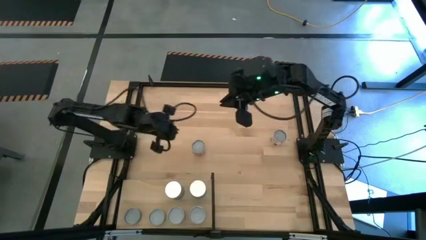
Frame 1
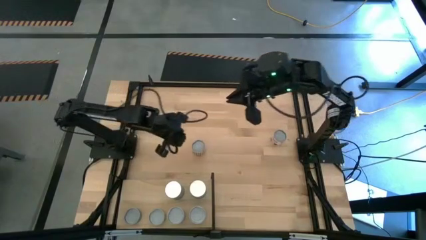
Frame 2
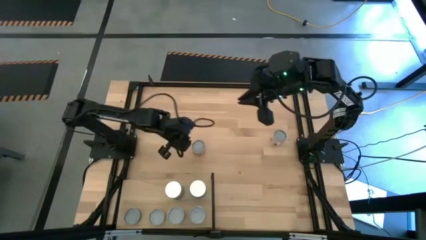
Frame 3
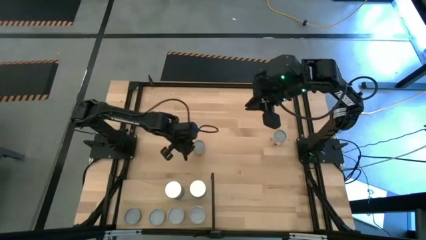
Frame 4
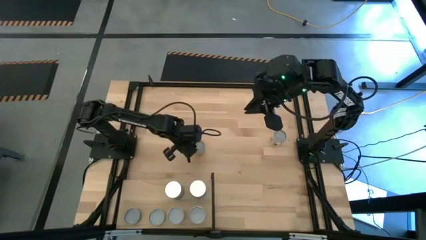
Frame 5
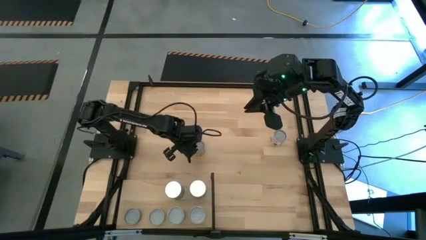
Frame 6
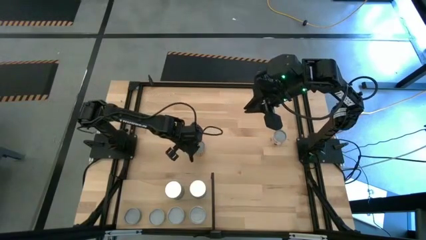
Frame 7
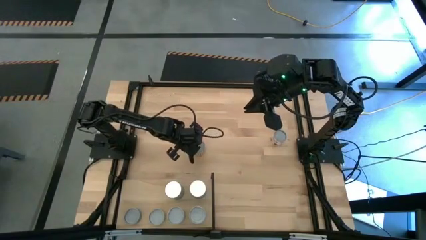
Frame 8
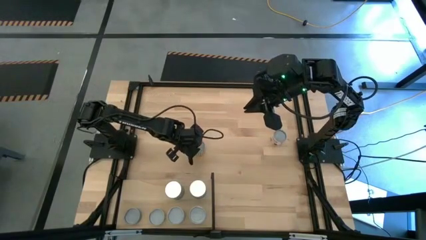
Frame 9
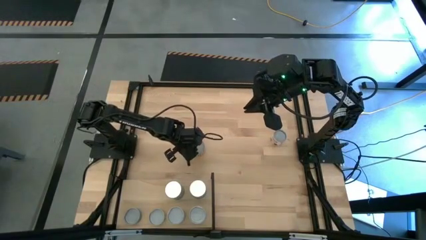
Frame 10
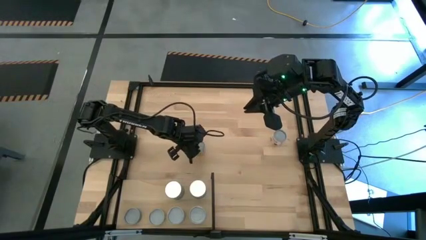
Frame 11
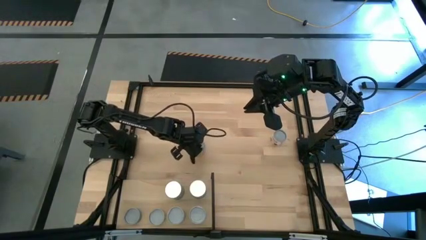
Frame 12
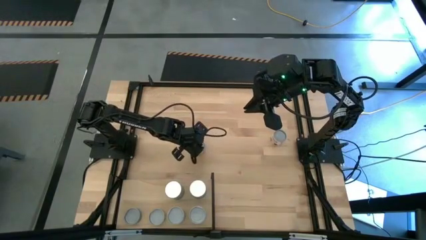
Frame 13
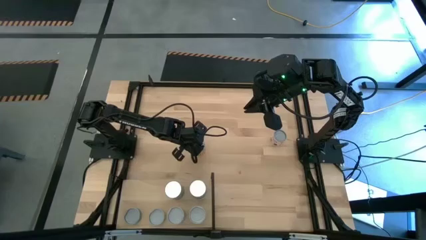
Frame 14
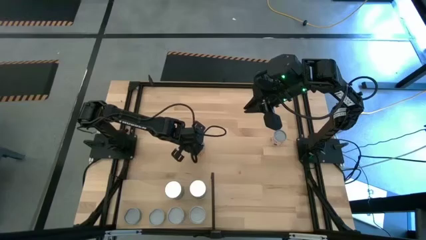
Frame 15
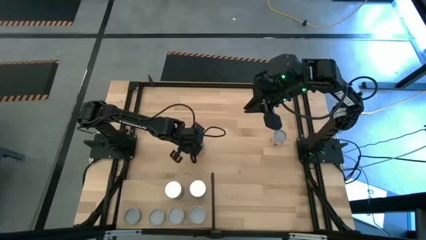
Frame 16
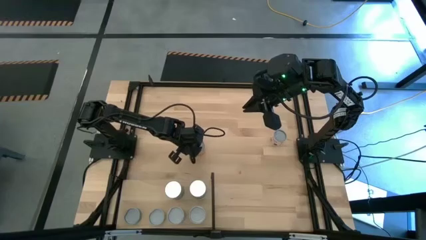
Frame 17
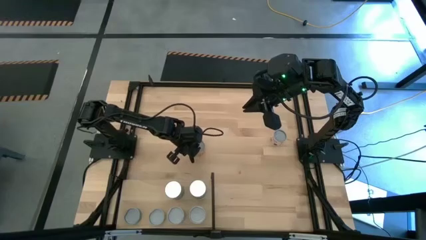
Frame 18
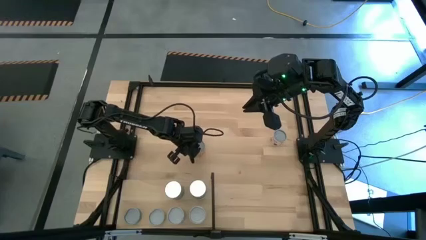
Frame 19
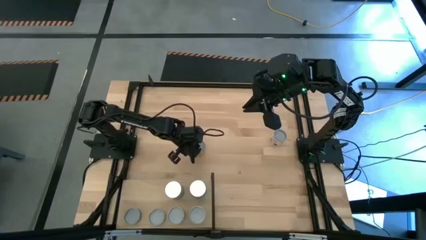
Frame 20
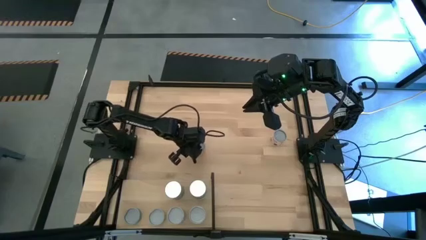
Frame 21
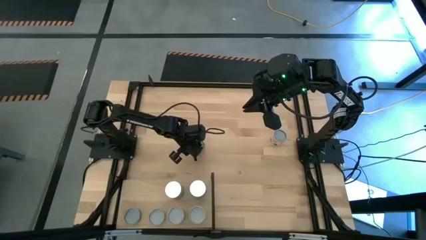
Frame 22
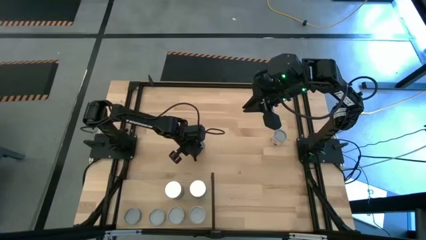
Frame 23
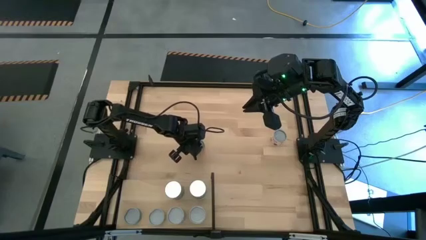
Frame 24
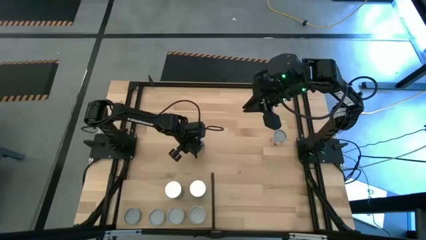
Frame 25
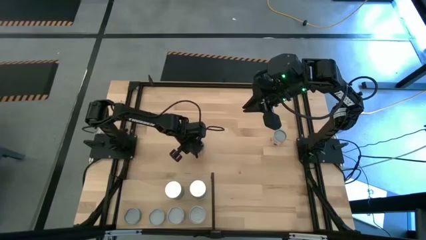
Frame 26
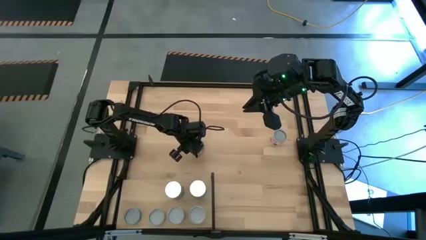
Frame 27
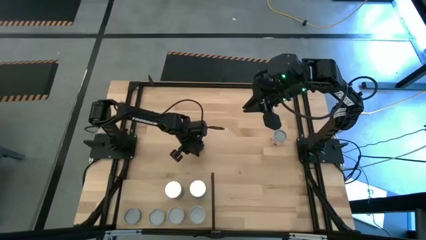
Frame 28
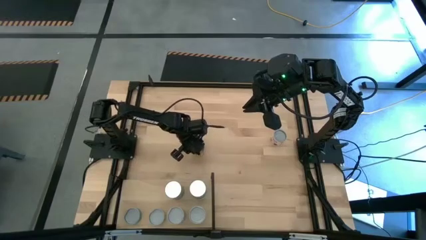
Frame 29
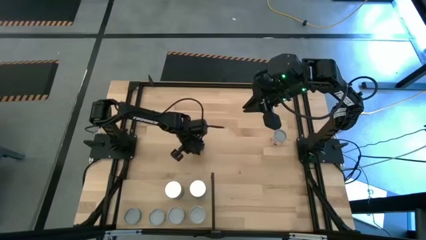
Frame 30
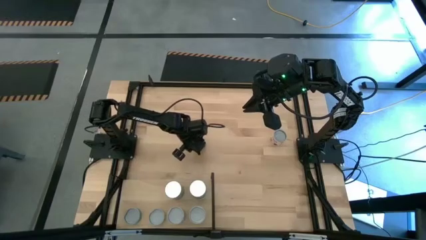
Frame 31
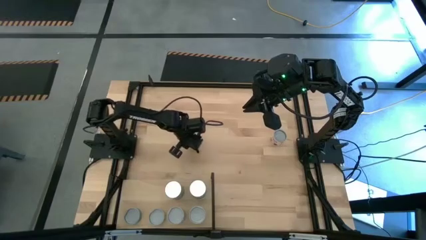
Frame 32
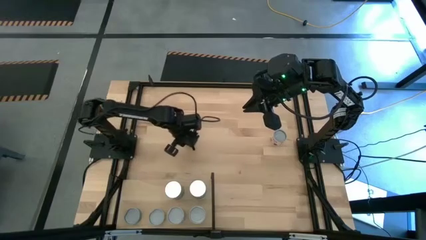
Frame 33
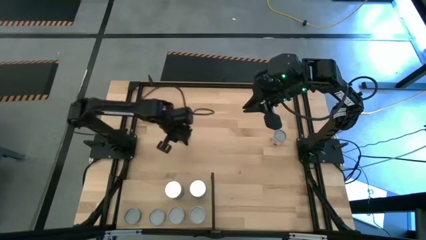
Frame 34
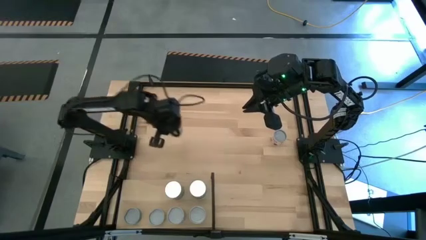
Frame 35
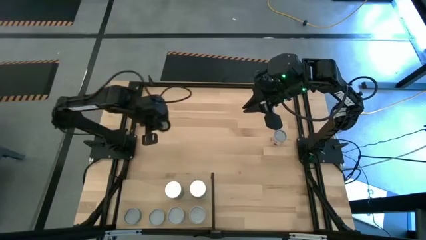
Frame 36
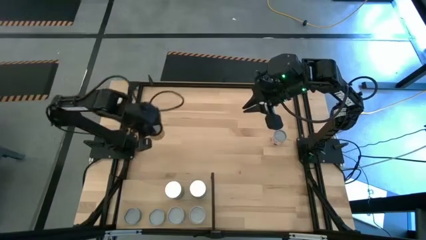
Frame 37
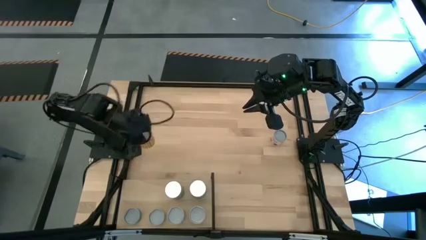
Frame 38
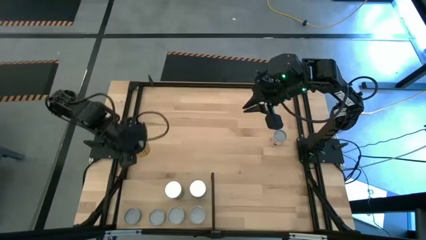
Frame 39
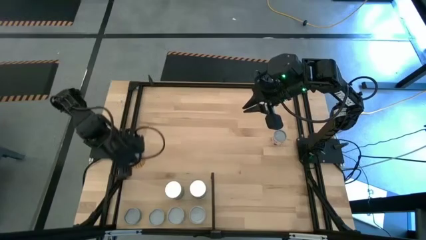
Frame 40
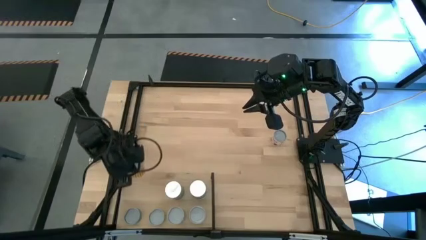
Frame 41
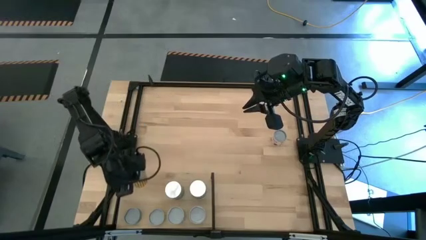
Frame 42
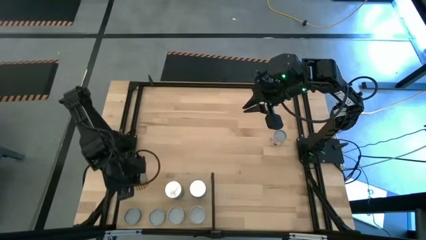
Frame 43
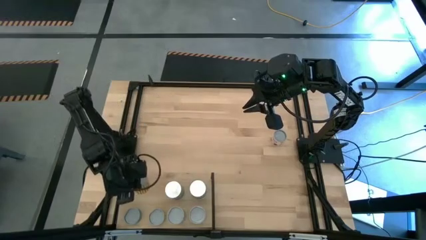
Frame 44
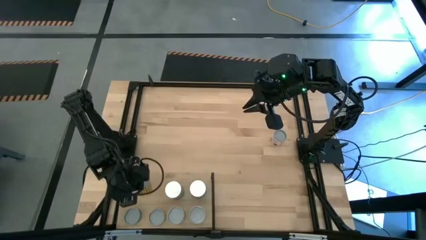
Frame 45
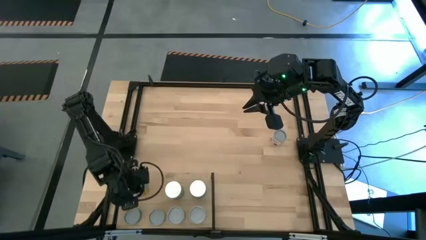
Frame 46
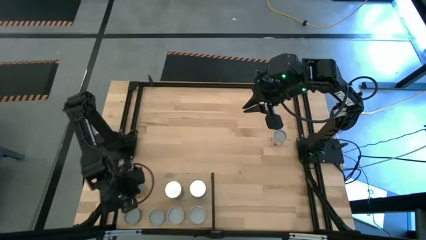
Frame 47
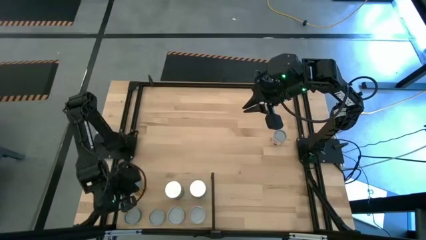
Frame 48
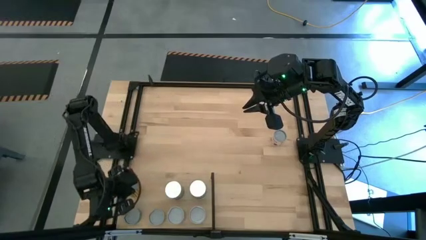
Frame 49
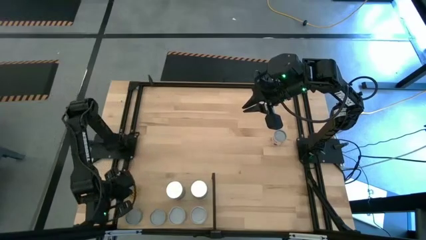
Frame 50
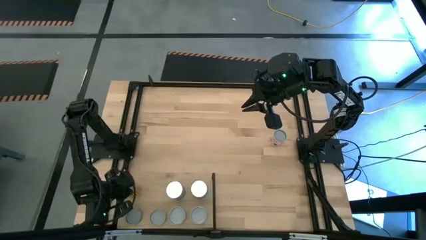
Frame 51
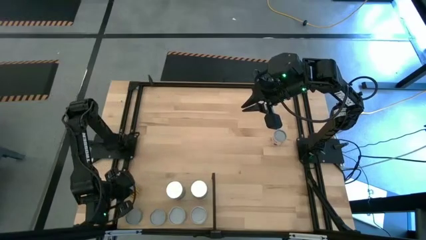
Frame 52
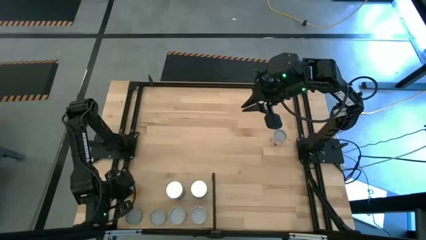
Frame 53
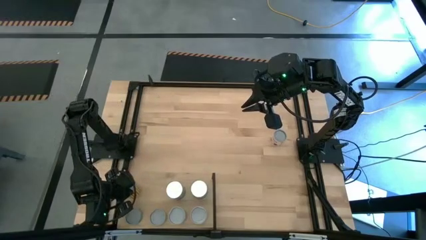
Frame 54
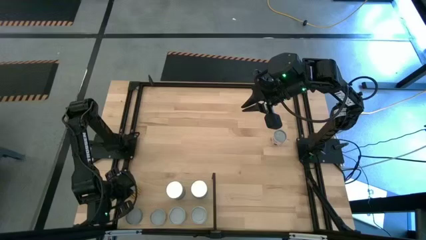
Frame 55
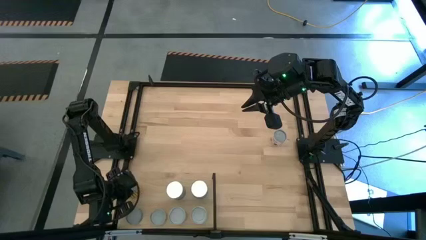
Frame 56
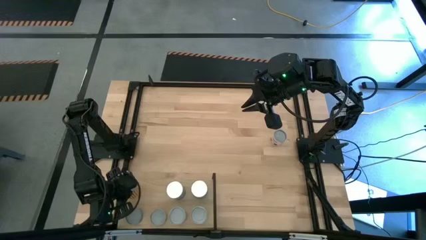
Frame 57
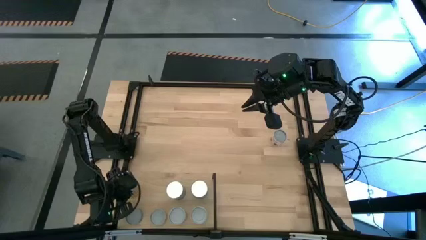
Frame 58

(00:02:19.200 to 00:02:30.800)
Task: Pick and place cans onto a shelf
Put the canned black beans on the shelf

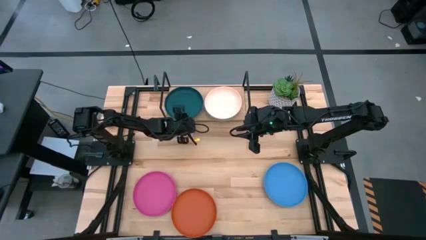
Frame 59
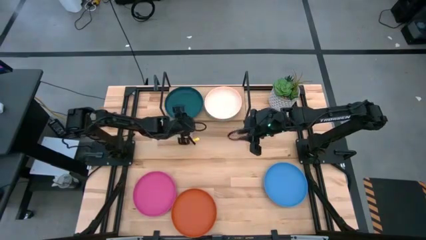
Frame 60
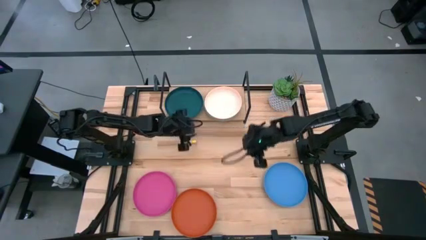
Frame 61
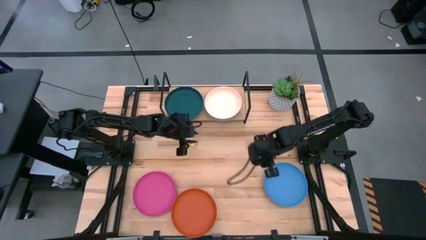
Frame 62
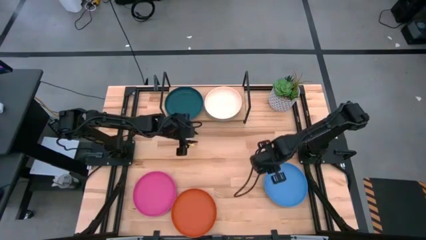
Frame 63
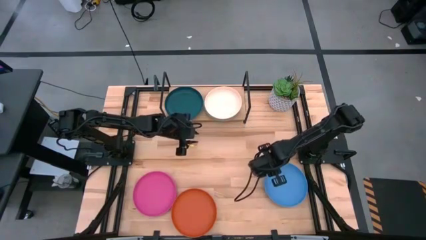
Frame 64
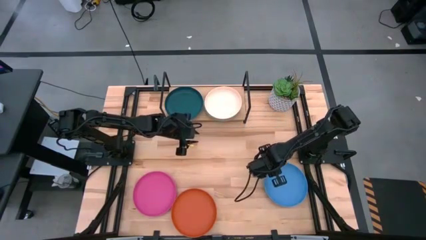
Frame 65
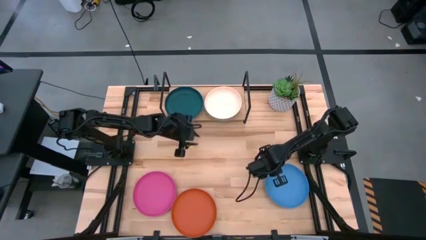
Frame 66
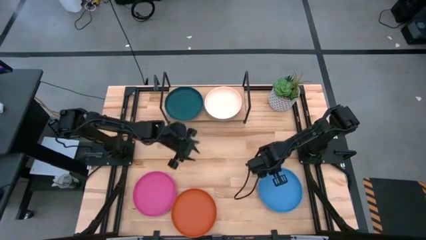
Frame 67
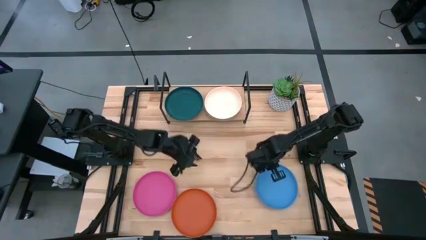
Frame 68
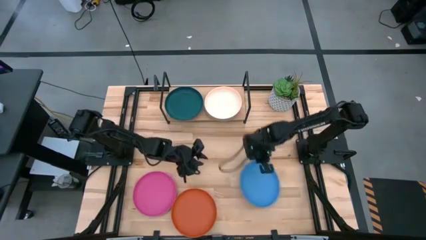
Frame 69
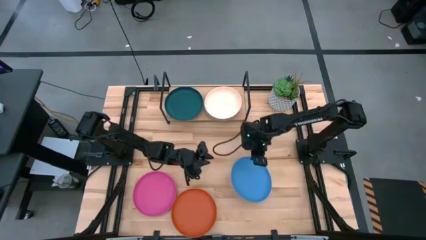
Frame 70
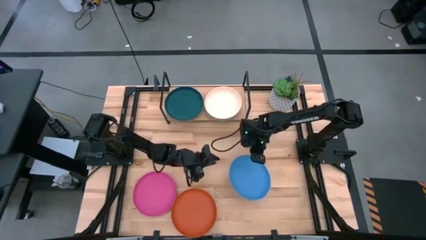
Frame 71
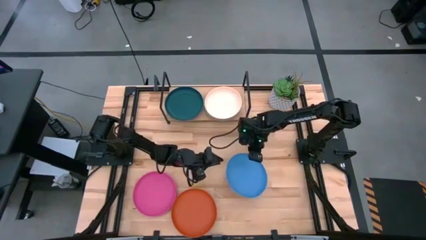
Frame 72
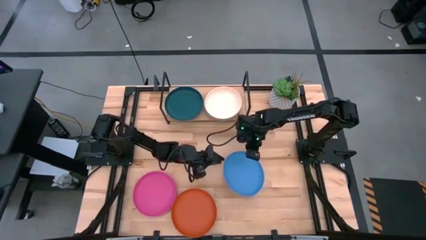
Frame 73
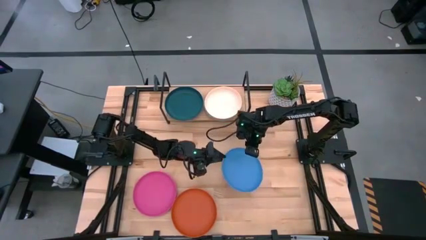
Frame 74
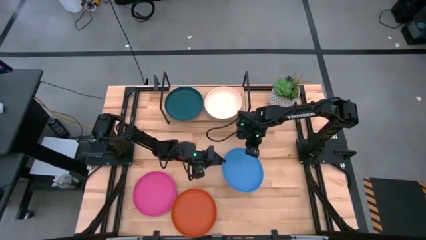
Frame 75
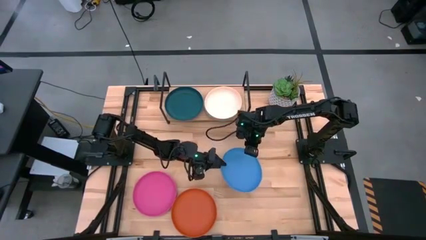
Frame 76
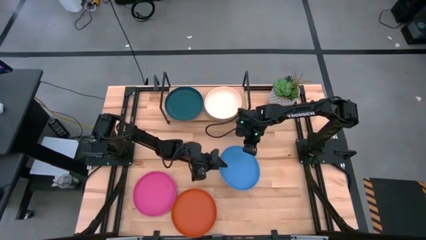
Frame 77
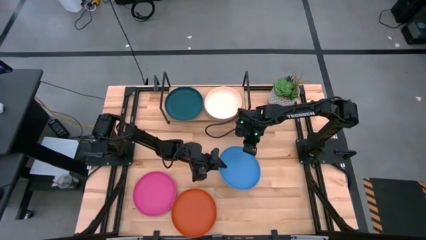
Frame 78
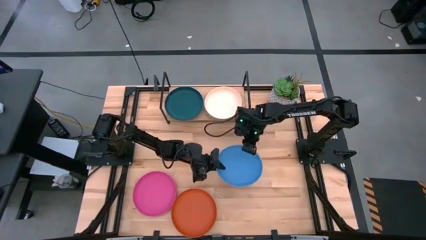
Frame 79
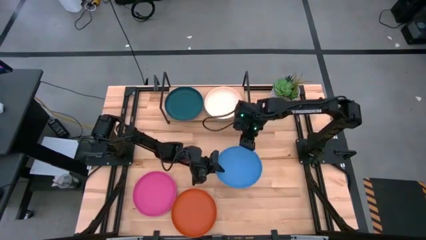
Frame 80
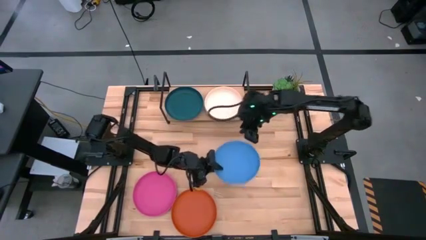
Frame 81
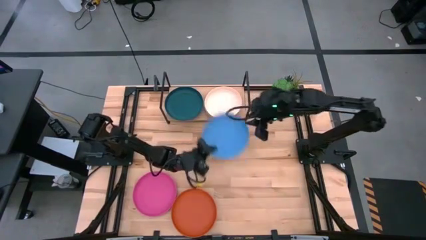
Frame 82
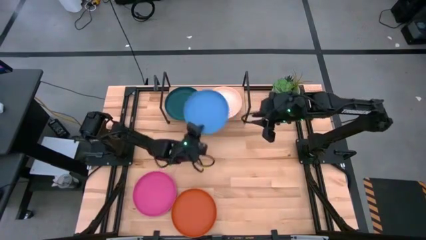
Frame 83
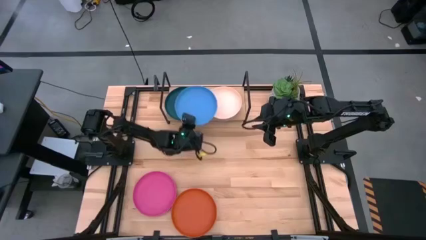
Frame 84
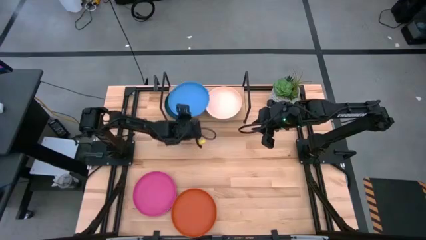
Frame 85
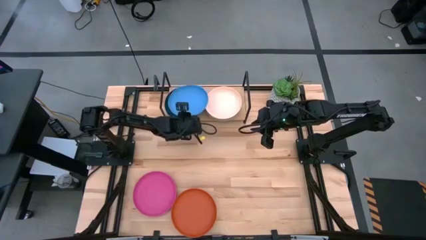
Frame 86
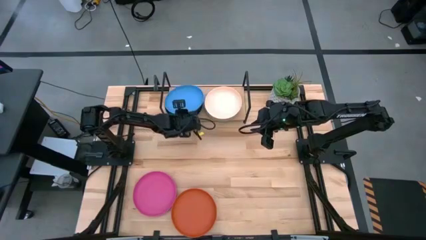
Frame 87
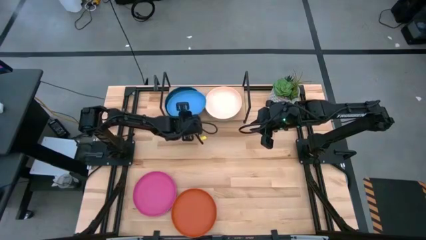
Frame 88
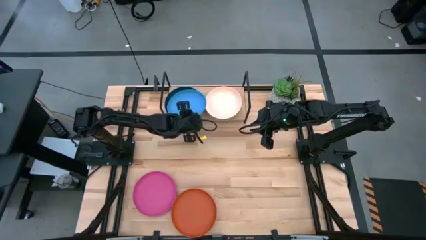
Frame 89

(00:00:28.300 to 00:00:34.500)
Task: Place and stack plates onto a shelf
Stack the blue plate on top of the dark green plate
